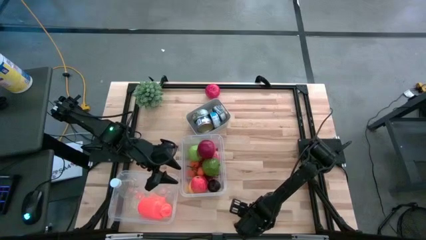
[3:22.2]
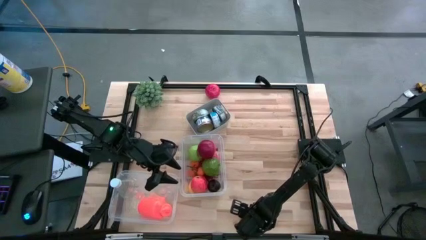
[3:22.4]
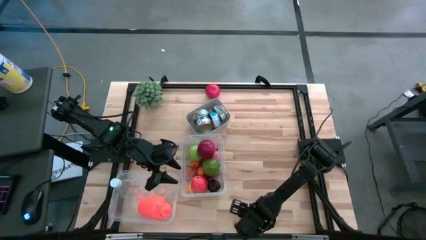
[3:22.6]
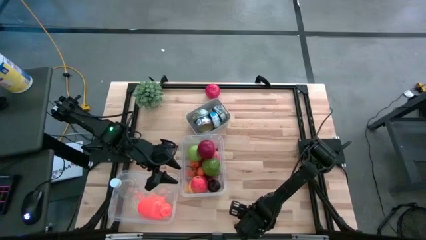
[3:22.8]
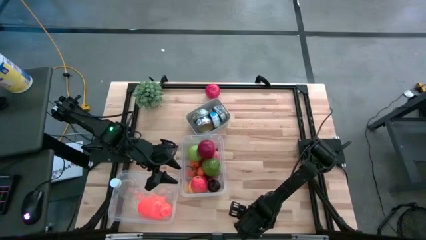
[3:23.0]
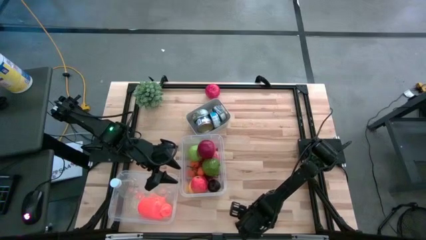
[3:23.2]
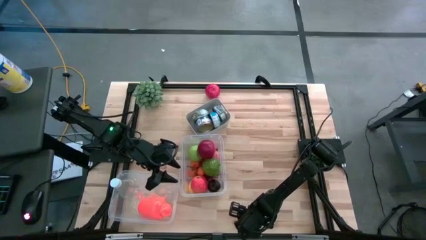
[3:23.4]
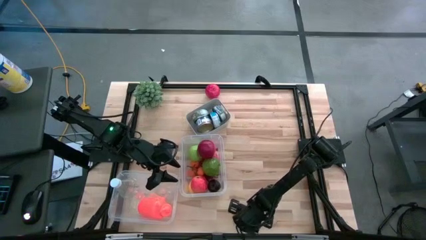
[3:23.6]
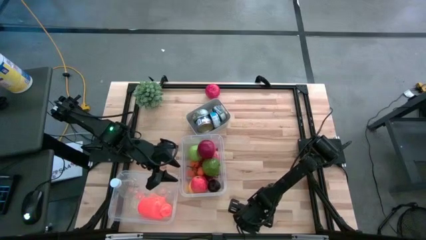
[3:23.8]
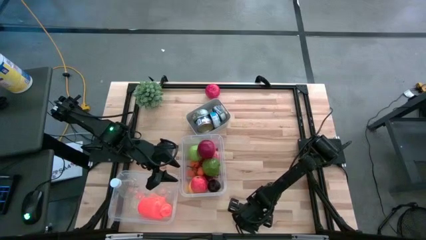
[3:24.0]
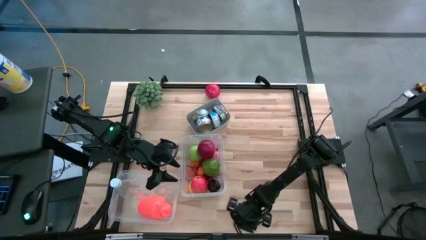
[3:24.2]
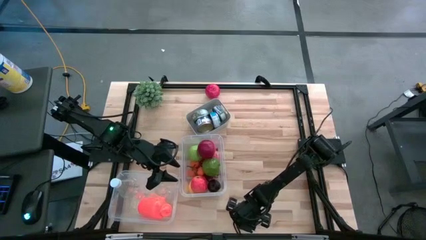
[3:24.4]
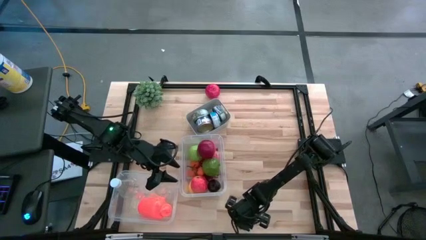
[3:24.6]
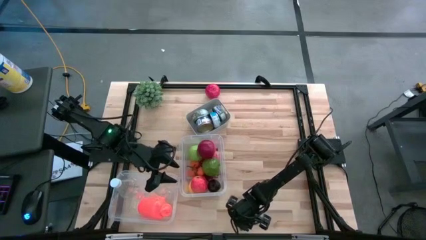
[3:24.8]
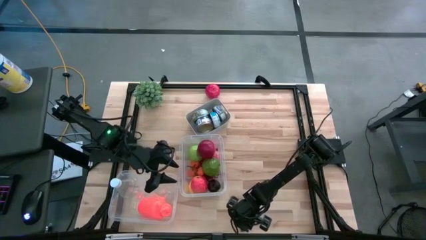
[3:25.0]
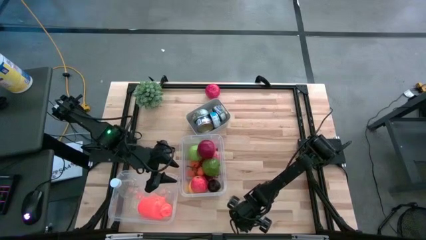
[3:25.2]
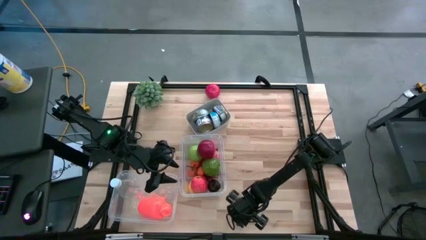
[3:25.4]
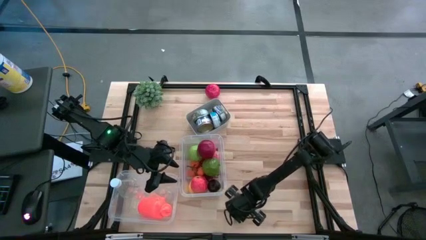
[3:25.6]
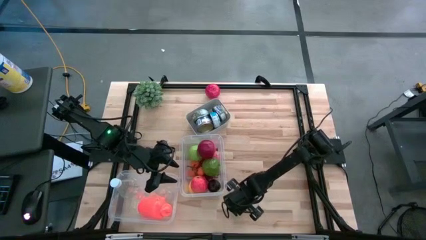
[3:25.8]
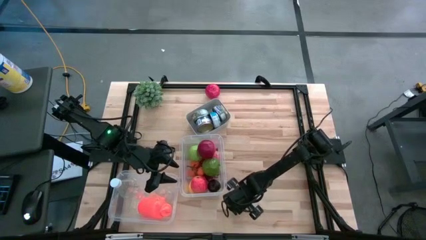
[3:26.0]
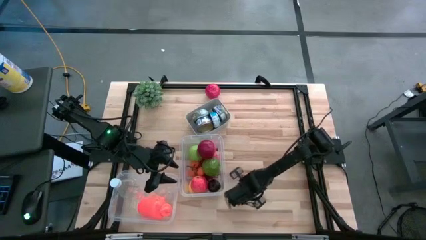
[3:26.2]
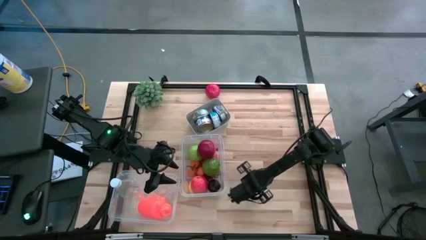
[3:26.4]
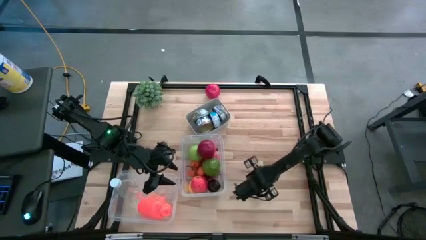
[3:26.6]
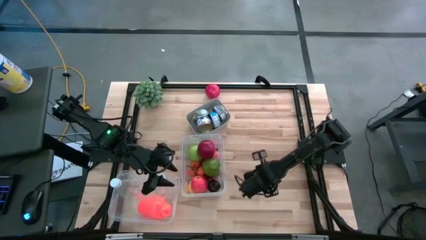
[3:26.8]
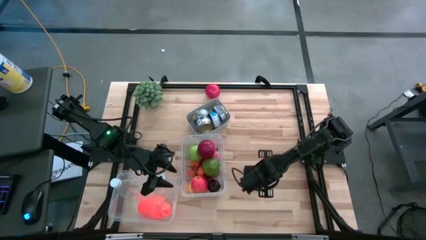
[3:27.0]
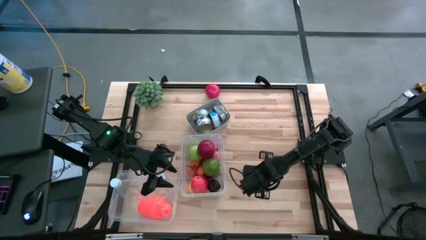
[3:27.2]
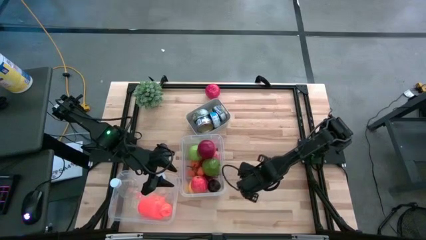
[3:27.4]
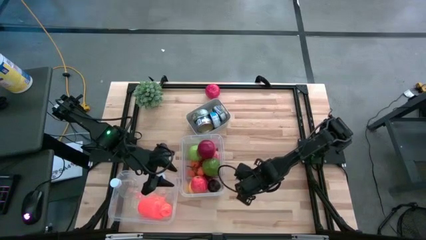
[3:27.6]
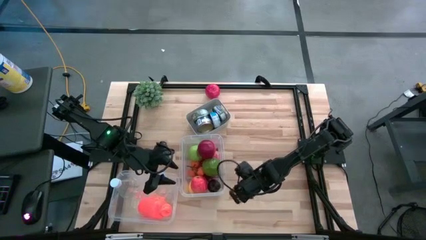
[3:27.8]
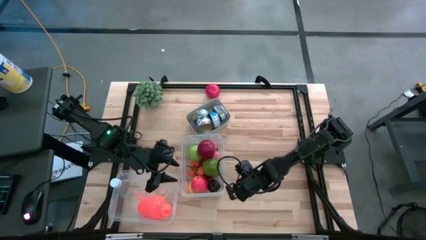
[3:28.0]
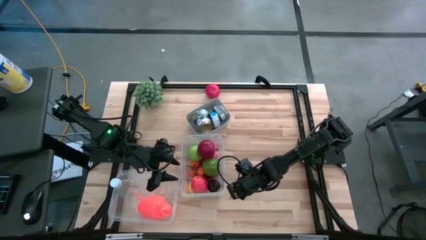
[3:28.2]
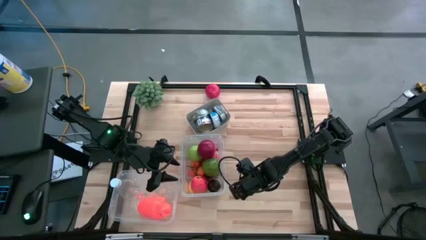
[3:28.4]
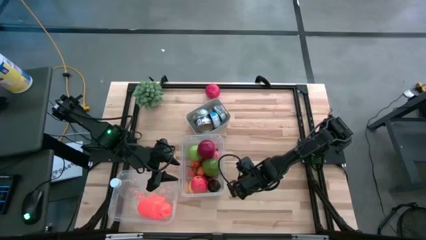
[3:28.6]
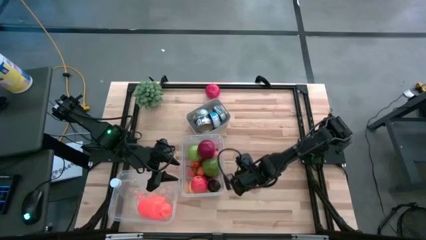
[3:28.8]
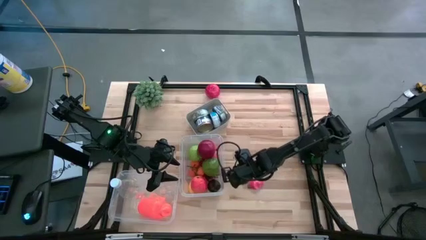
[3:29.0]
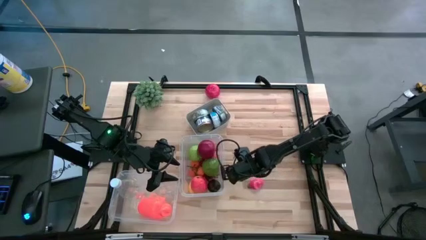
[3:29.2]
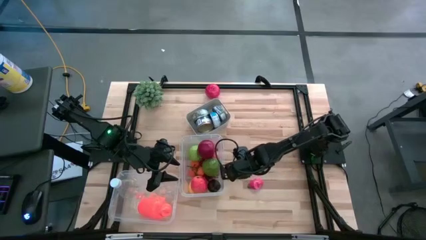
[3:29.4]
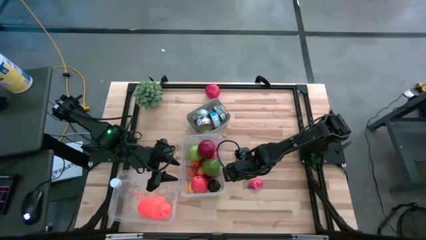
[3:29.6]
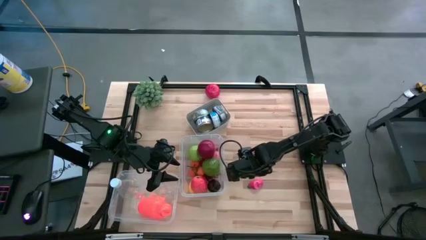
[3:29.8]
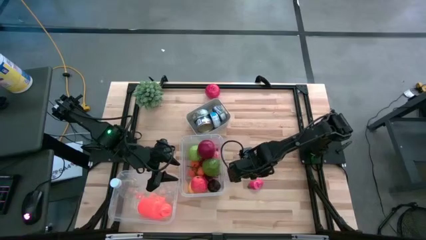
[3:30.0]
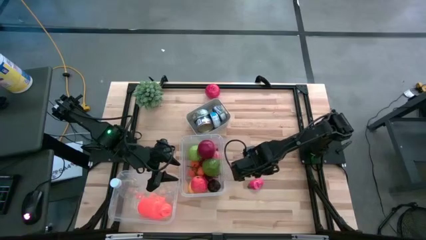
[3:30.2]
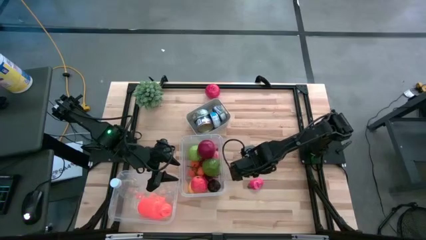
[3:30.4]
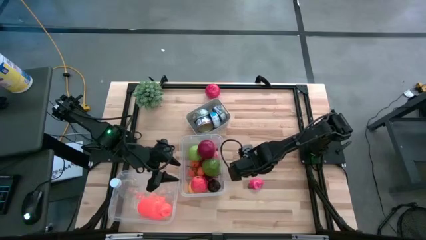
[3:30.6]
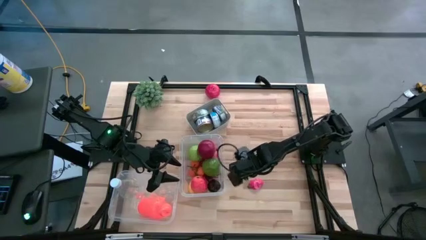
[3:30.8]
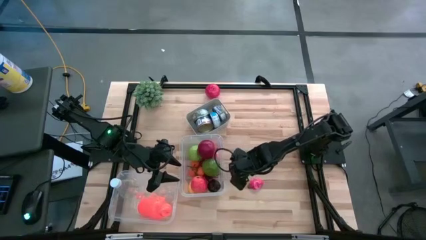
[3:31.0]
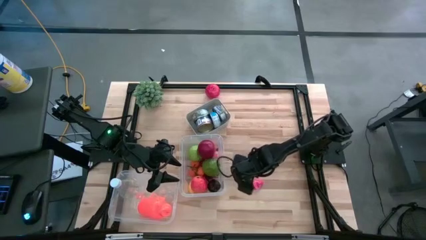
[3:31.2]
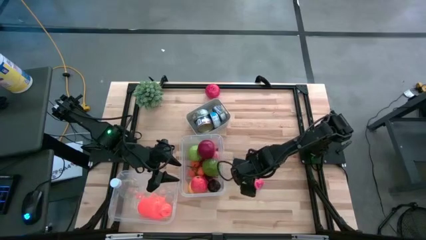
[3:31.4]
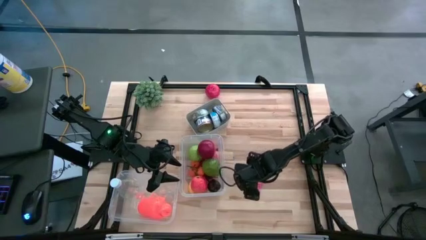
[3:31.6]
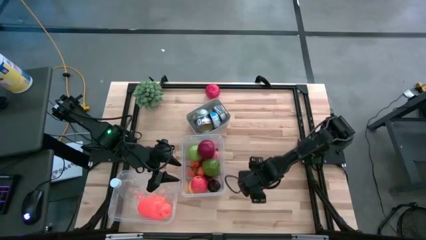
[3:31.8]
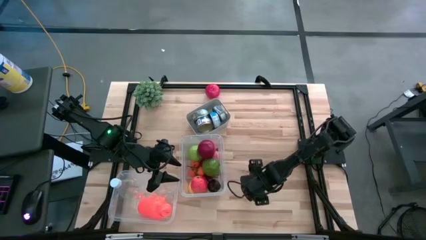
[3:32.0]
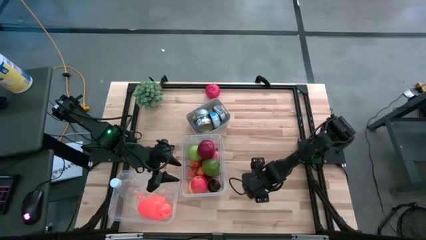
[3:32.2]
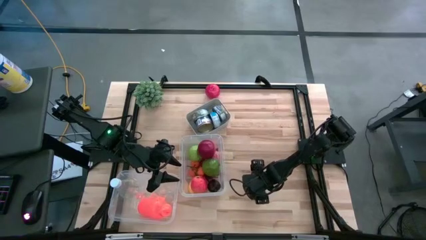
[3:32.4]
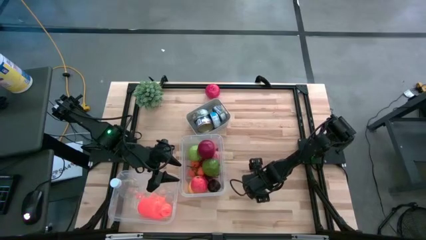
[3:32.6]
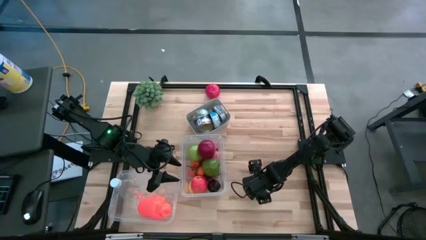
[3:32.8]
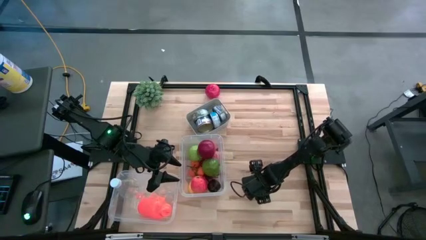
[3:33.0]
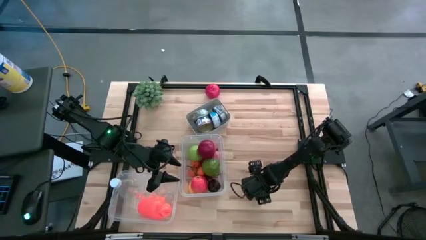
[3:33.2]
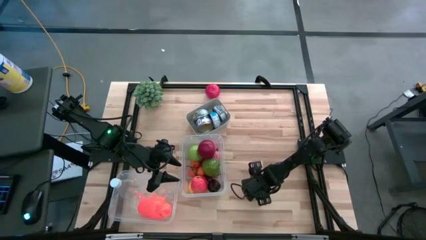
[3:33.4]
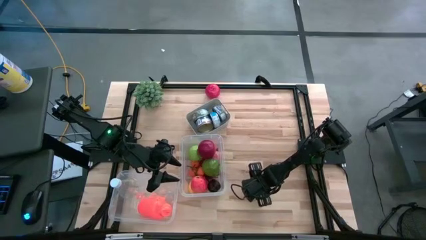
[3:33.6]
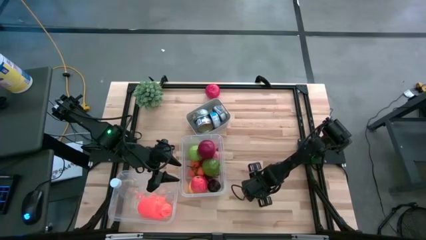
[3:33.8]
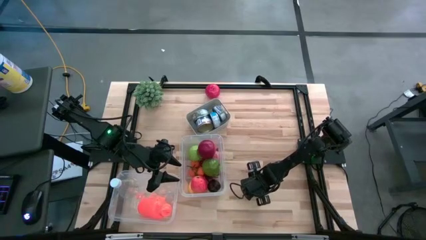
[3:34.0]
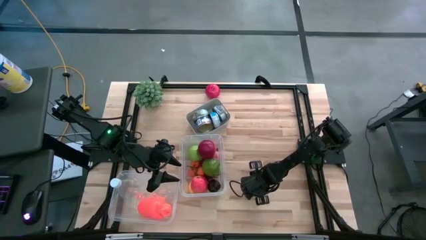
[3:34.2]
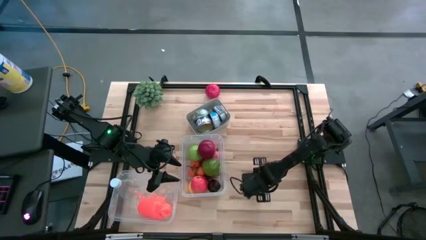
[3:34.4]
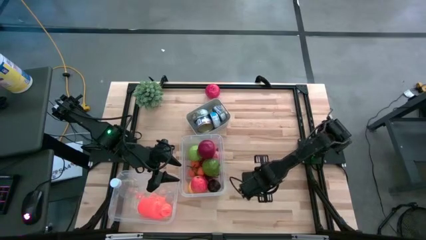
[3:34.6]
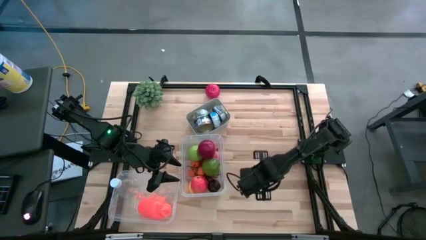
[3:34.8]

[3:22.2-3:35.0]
Task: Pick & Place Food Item
Put the red dragon fruit into the right transparent bin

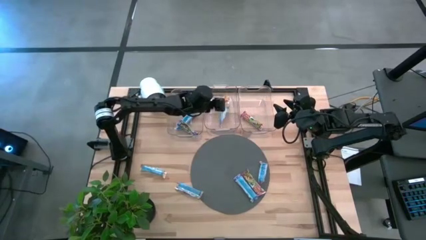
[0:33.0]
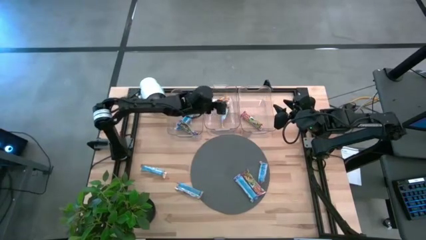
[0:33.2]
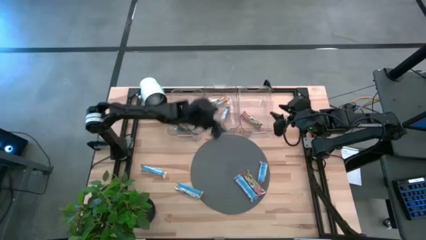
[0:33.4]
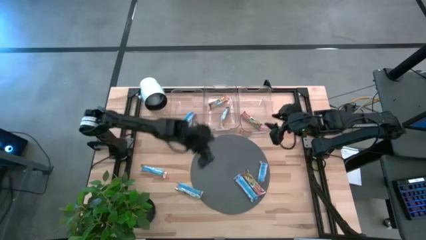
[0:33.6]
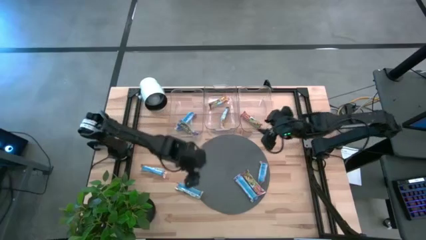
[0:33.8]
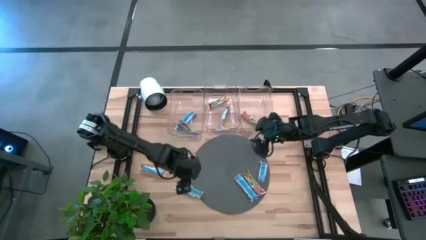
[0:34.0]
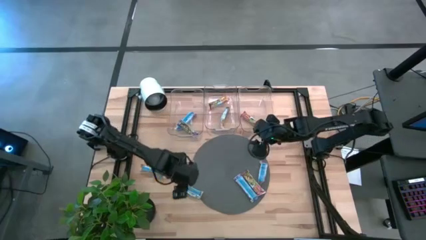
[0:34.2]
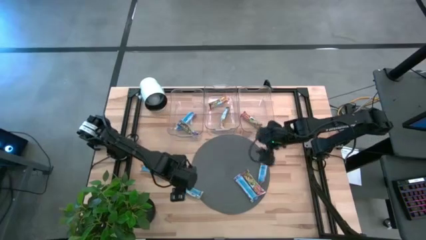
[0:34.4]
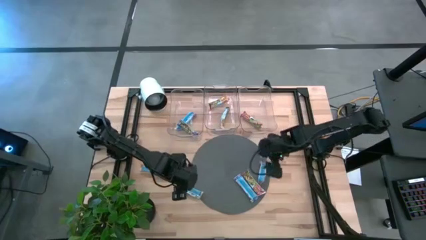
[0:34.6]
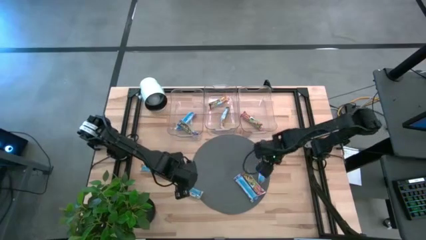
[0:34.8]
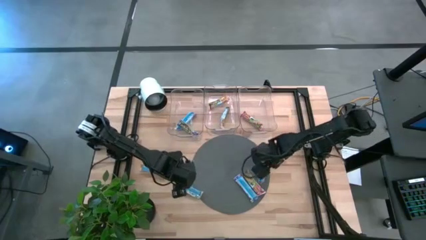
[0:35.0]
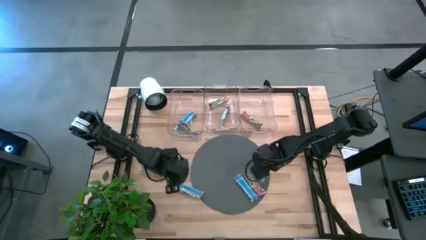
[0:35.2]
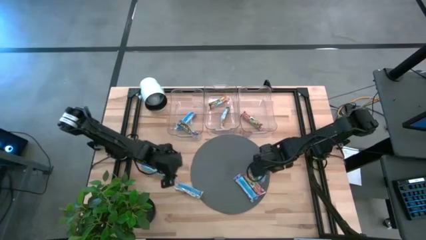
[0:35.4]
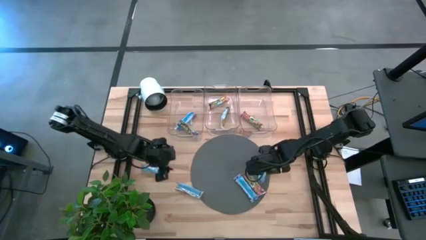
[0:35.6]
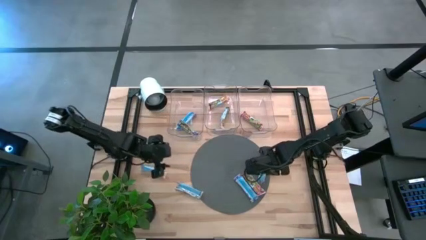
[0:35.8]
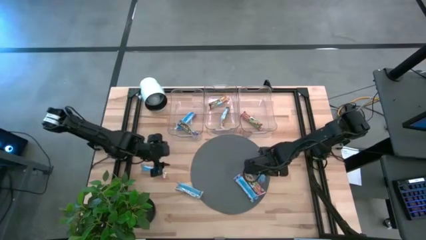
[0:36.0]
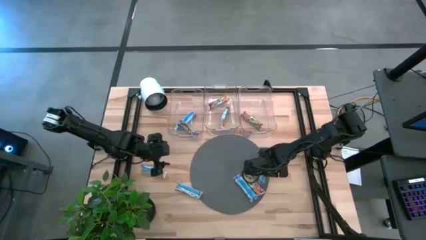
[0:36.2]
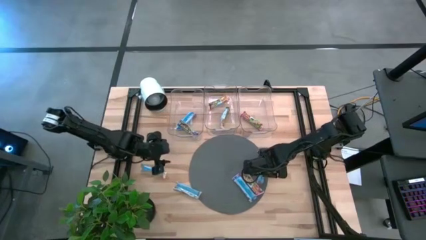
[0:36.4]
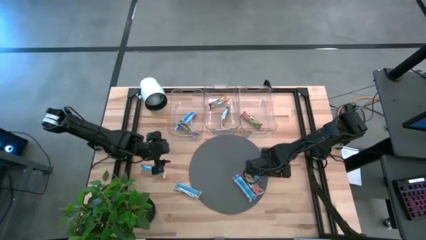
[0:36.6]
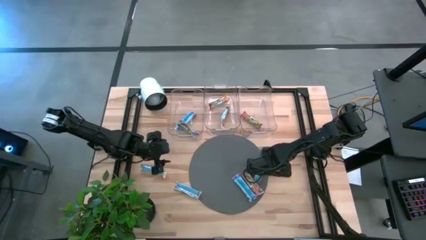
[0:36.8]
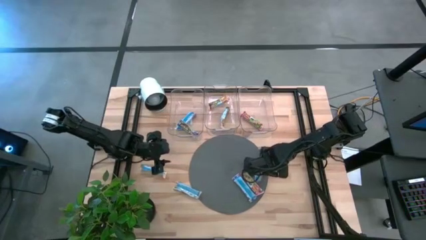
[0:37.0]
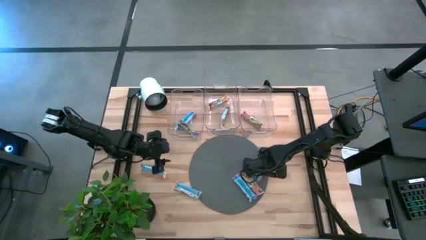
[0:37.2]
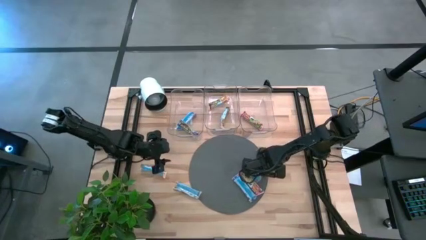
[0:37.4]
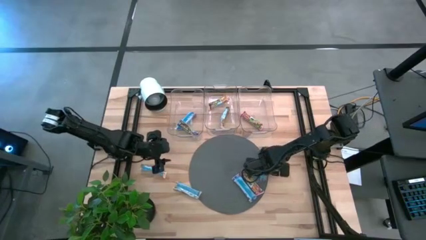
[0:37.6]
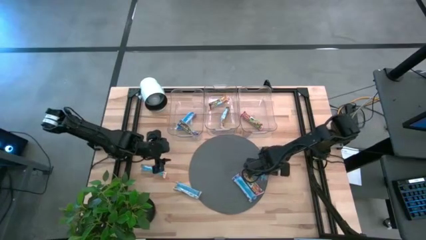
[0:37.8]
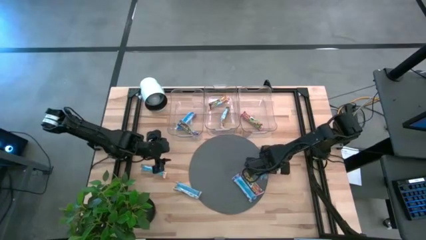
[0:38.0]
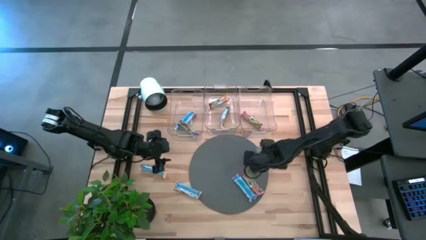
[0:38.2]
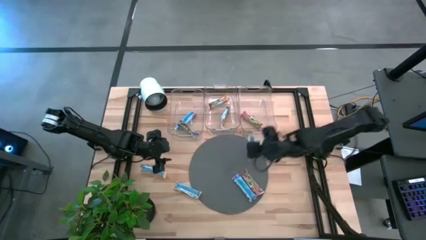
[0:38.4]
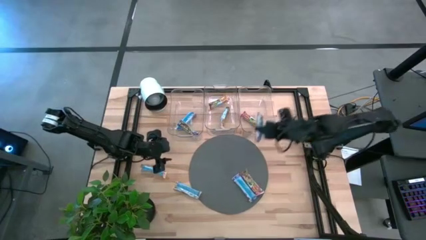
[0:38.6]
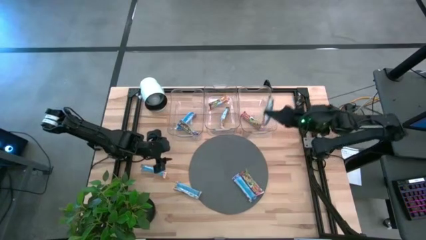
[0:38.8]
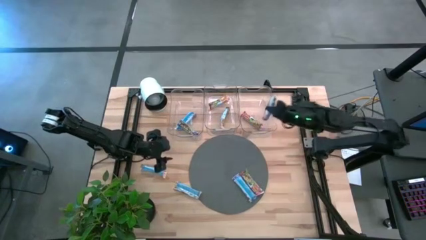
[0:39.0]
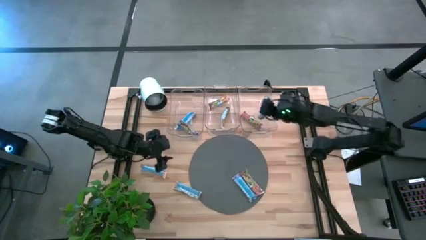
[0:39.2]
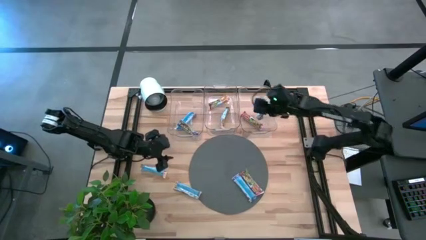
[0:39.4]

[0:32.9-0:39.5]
Task: Pick and place Granola Bars by type
Put the red granola bar into the right bin
